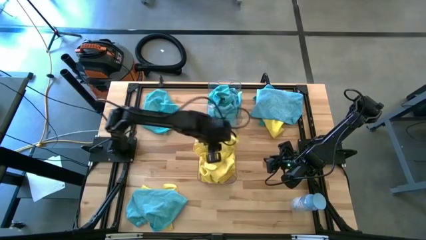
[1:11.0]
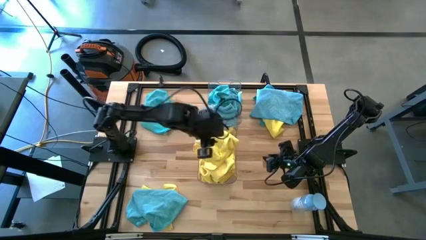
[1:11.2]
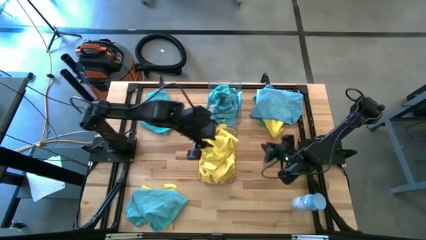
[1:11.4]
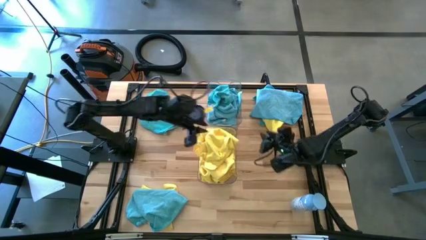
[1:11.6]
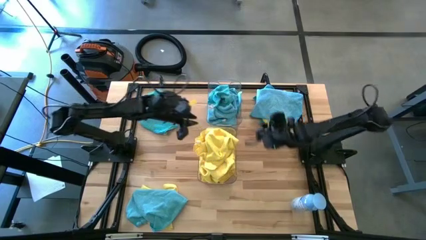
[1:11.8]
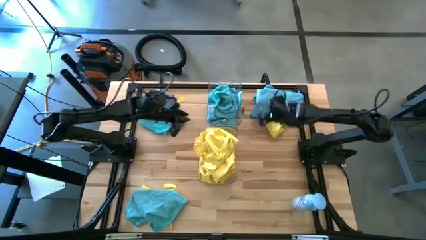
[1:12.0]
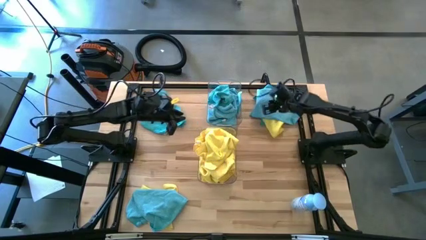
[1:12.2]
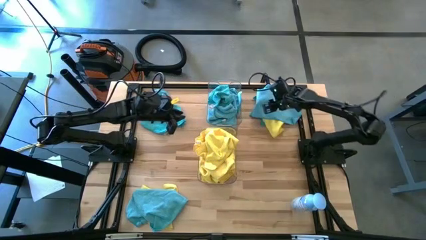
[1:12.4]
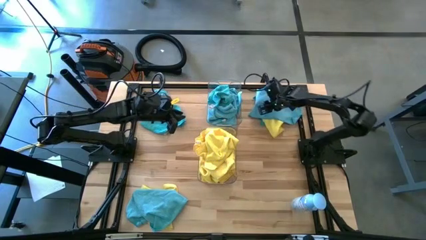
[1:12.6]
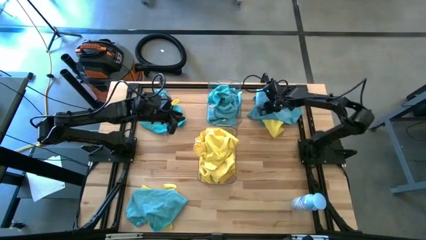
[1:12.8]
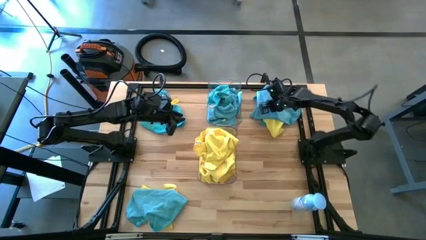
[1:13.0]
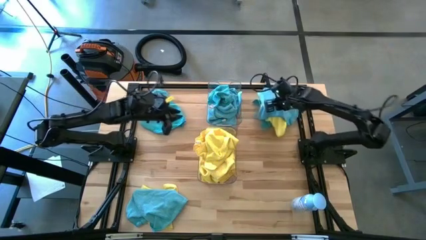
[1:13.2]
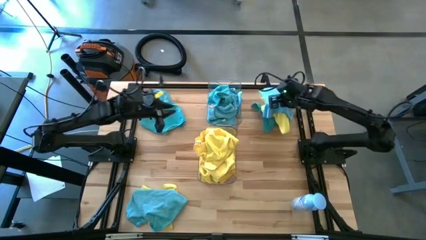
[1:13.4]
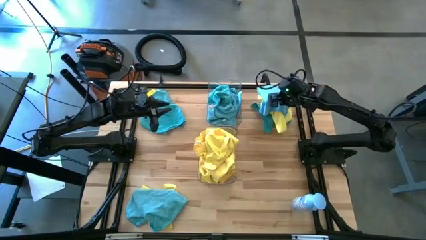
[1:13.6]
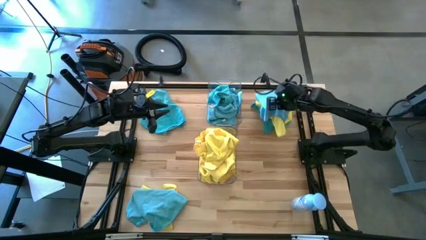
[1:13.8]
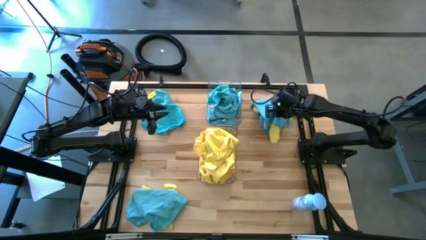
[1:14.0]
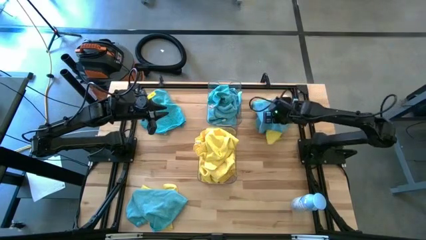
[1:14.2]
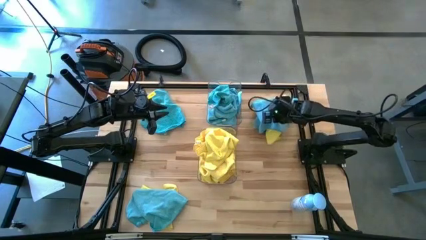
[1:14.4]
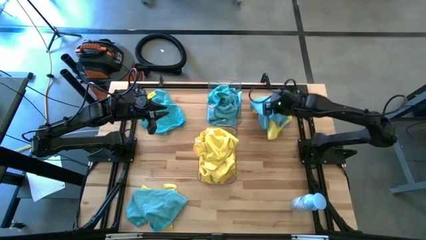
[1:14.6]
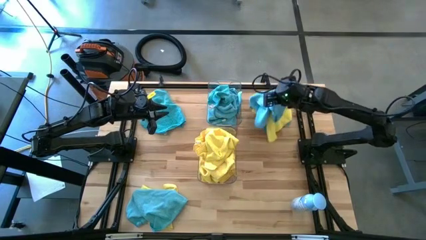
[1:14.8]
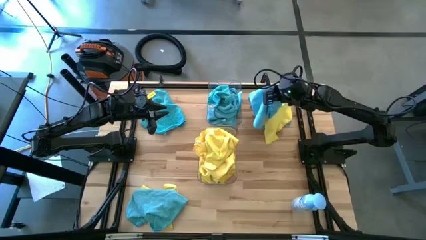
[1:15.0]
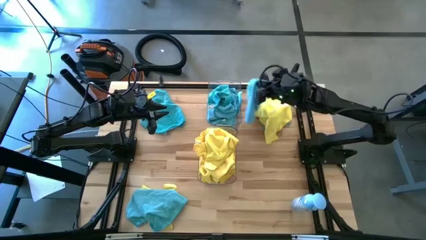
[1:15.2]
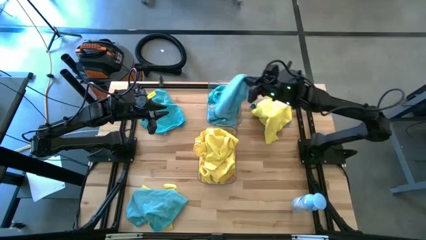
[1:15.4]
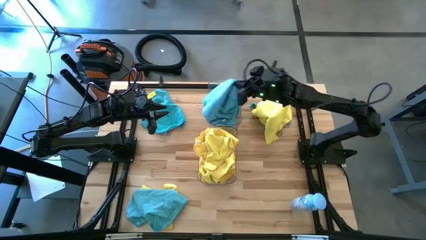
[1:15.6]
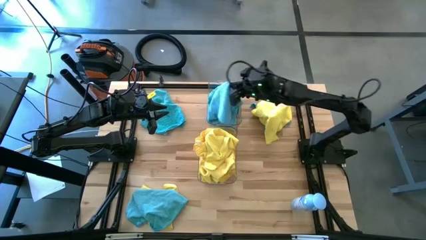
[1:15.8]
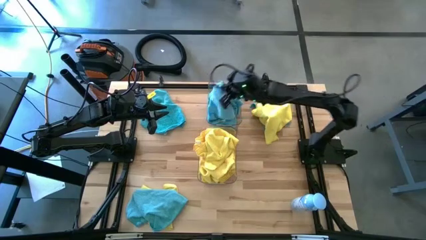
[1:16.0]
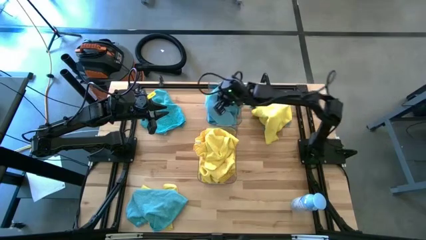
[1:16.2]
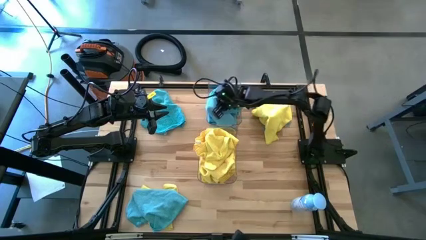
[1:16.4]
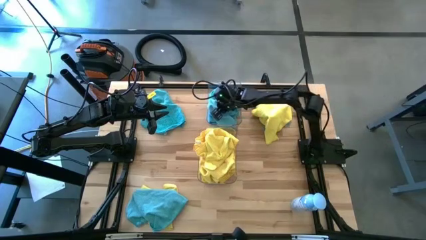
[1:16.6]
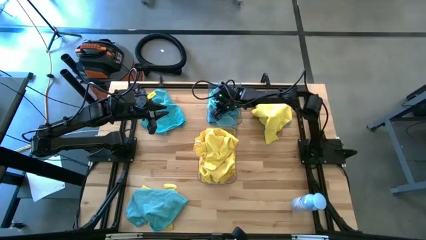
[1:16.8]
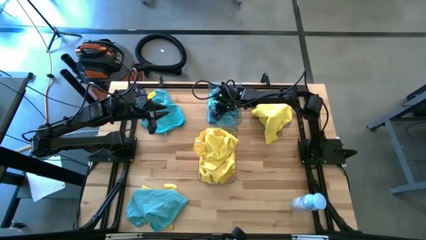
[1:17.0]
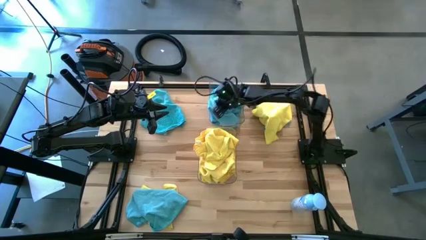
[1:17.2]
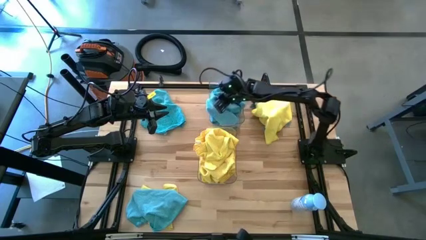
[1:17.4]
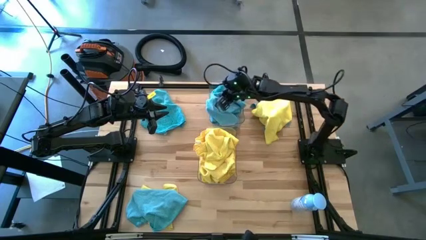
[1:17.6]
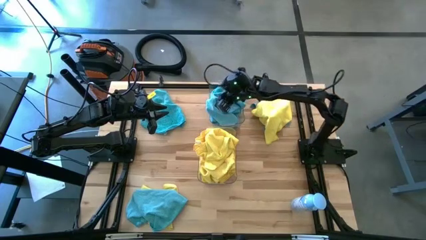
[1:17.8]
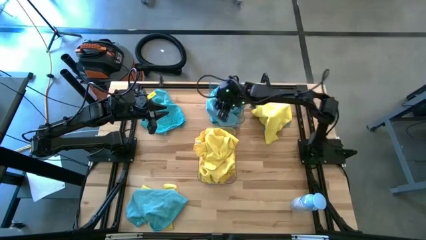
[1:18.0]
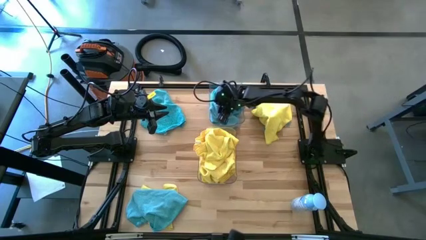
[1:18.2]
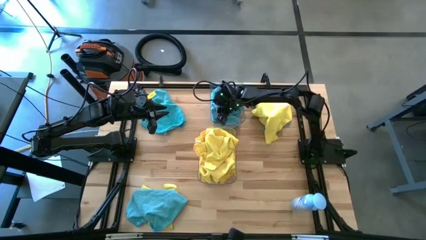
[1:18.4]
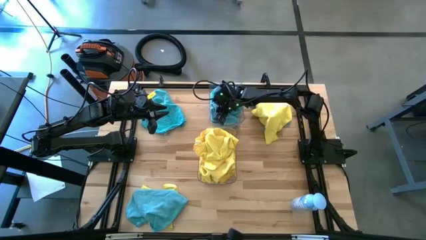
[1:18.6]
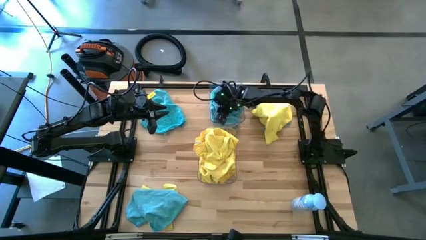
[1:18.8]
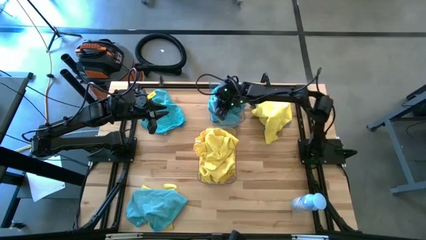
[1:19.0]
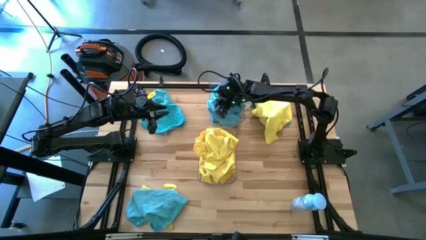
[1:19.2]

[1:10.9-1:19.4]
Task: Sort microfiber towel by color & place in baskets
Put the blue towel into the top transparent bin

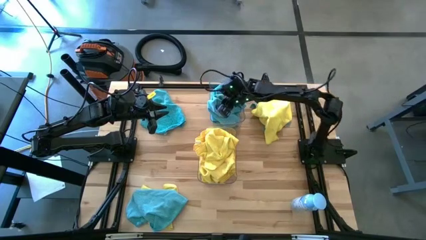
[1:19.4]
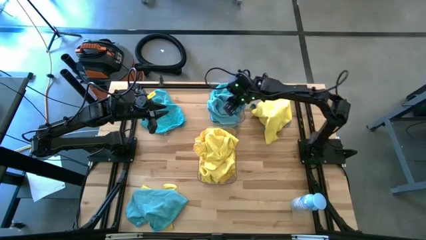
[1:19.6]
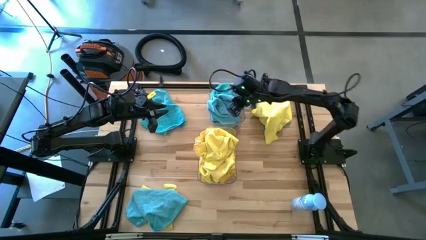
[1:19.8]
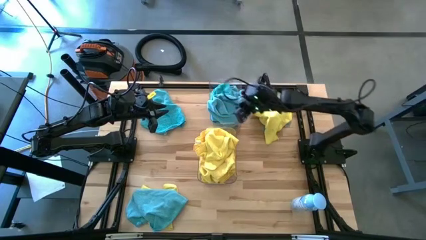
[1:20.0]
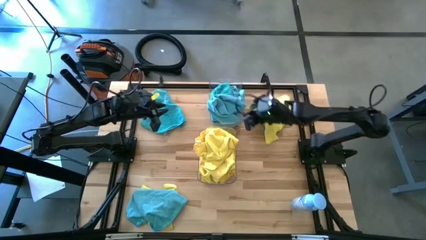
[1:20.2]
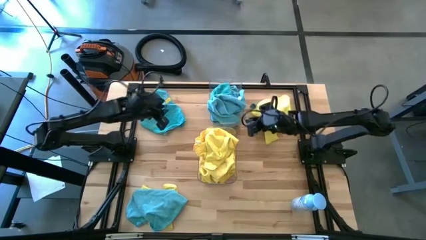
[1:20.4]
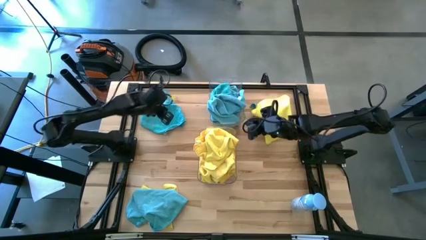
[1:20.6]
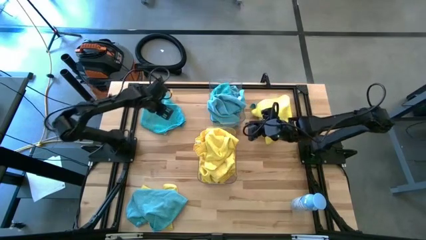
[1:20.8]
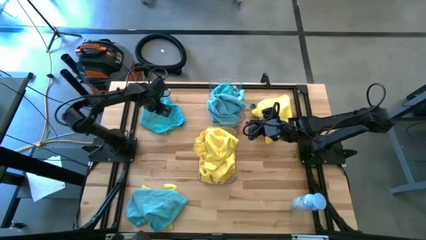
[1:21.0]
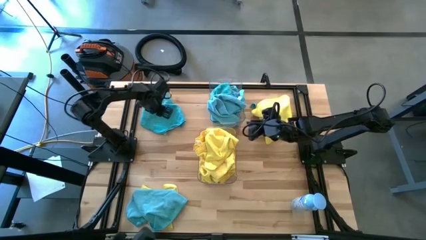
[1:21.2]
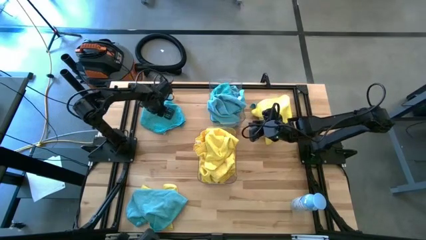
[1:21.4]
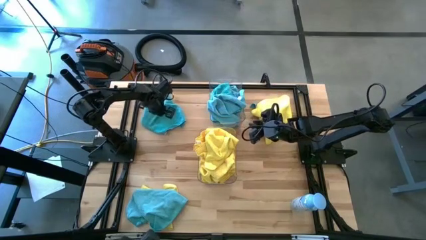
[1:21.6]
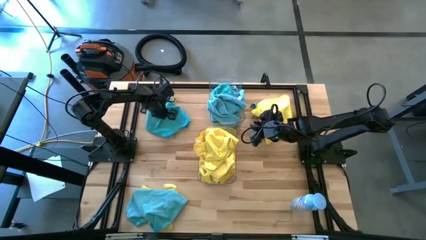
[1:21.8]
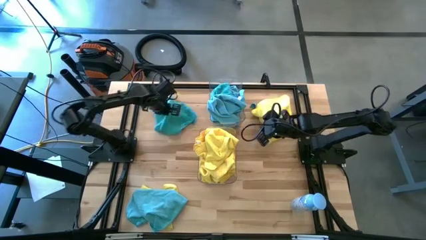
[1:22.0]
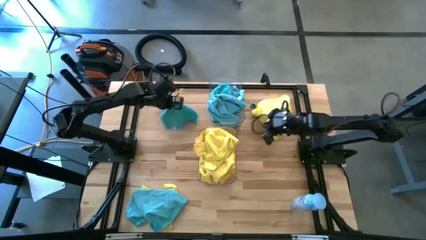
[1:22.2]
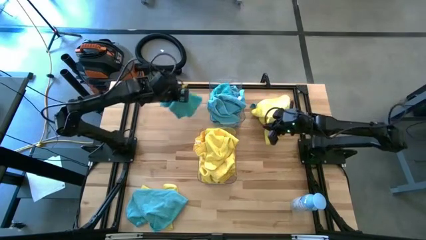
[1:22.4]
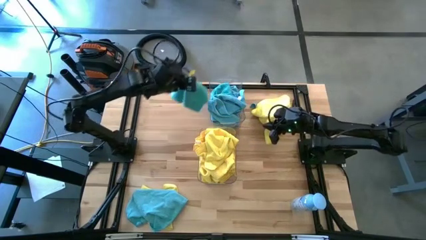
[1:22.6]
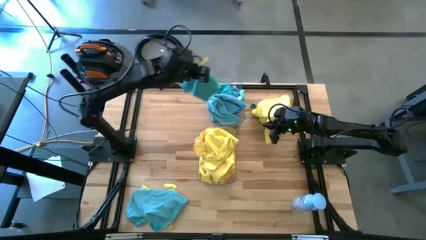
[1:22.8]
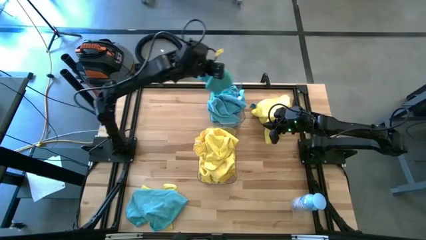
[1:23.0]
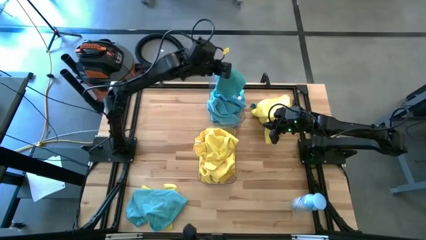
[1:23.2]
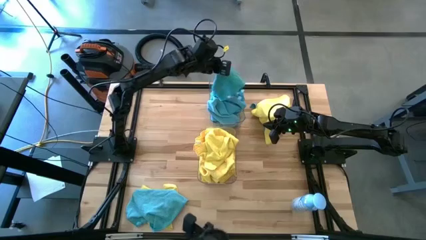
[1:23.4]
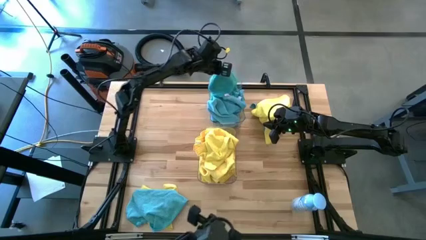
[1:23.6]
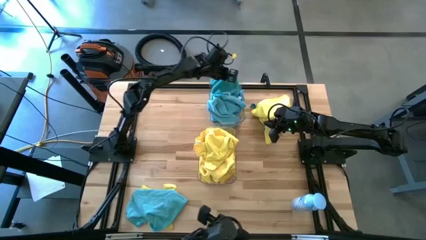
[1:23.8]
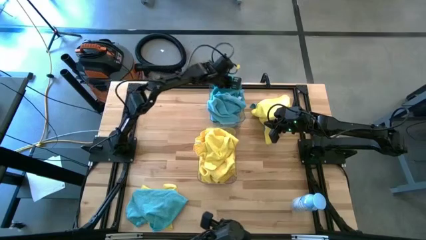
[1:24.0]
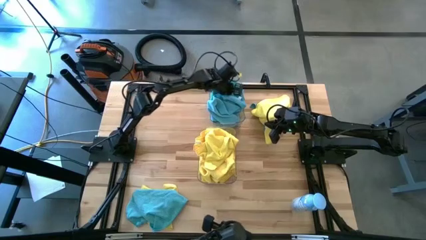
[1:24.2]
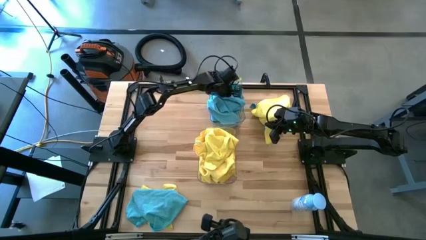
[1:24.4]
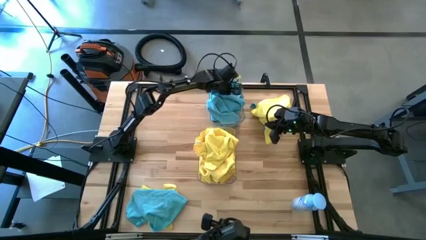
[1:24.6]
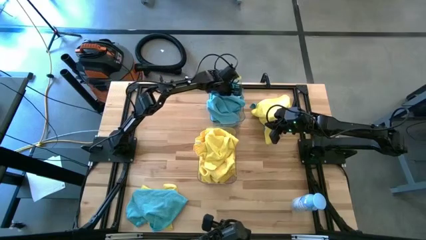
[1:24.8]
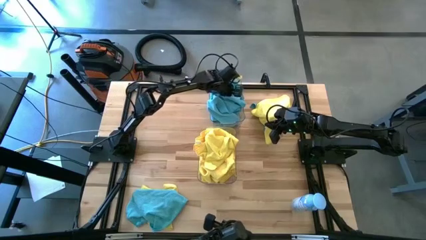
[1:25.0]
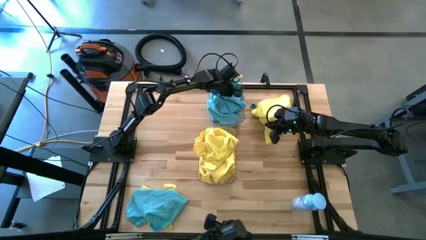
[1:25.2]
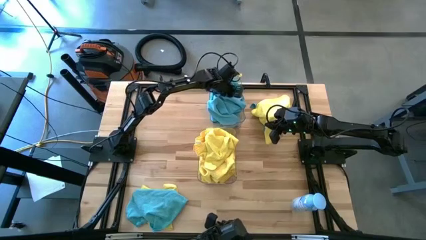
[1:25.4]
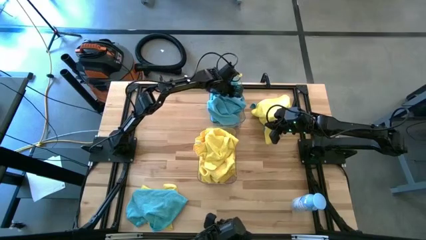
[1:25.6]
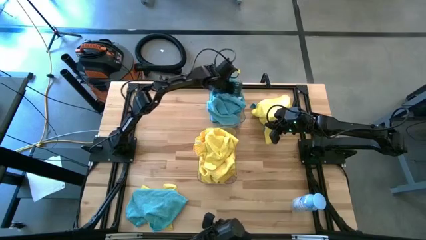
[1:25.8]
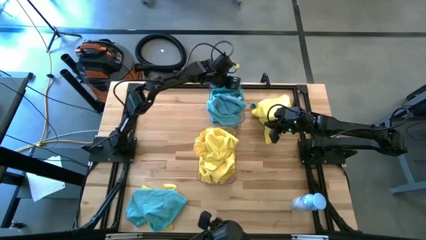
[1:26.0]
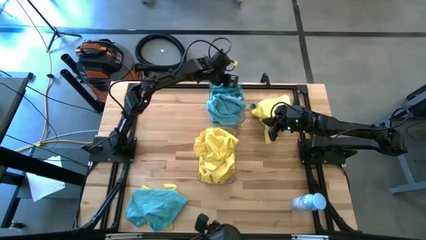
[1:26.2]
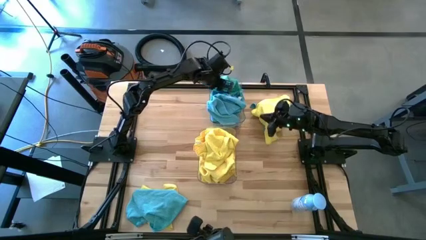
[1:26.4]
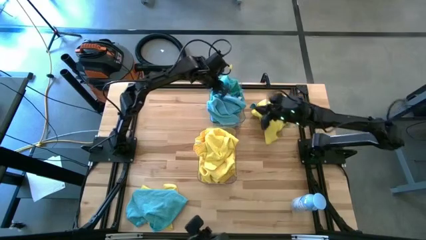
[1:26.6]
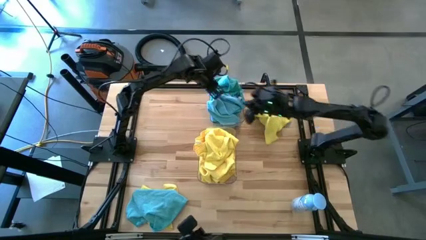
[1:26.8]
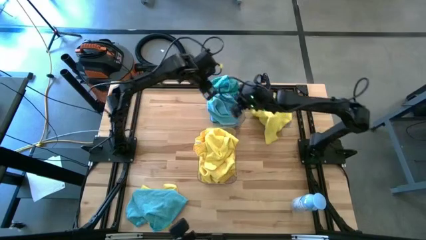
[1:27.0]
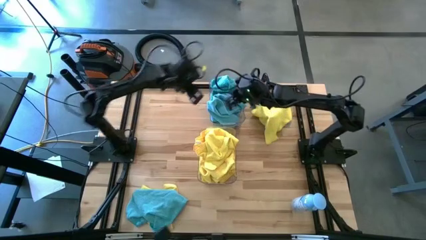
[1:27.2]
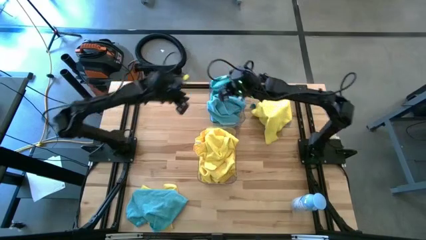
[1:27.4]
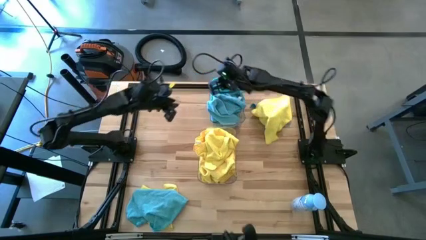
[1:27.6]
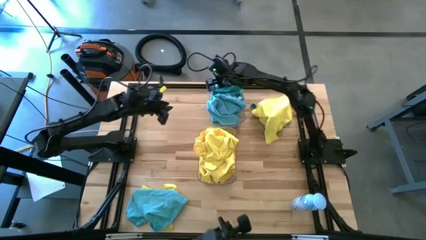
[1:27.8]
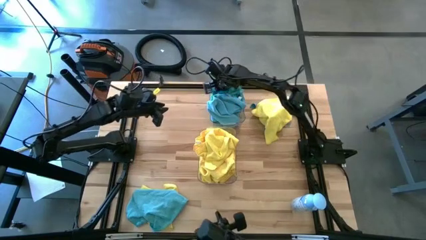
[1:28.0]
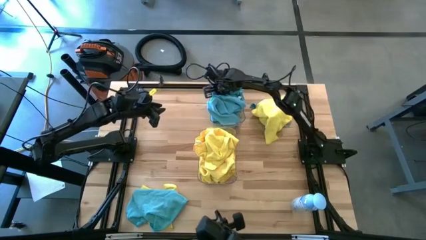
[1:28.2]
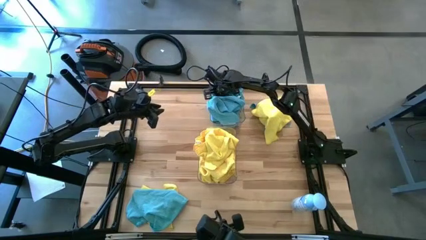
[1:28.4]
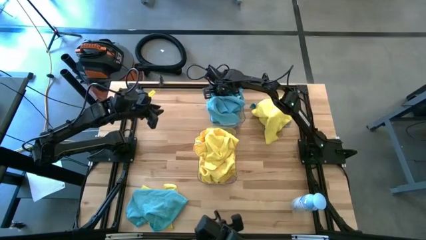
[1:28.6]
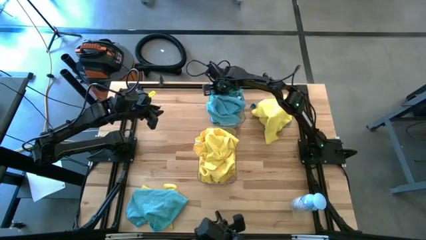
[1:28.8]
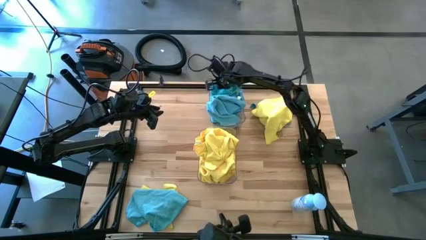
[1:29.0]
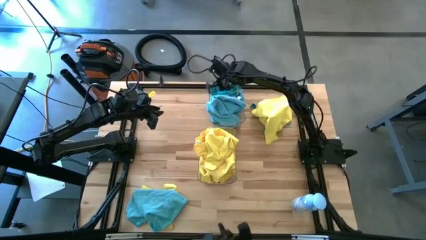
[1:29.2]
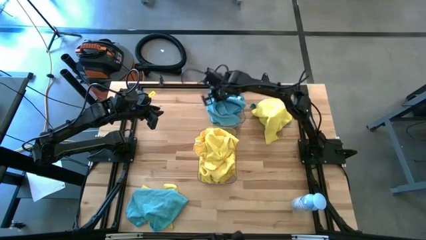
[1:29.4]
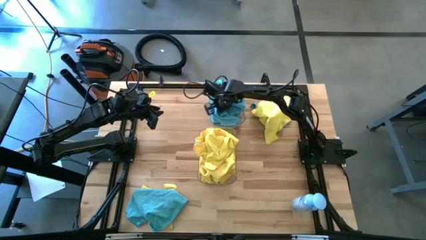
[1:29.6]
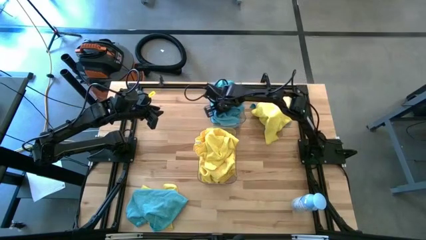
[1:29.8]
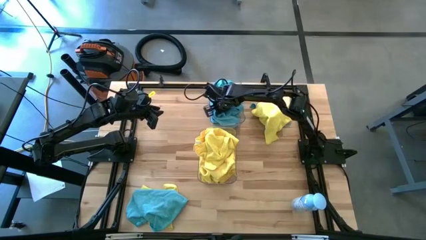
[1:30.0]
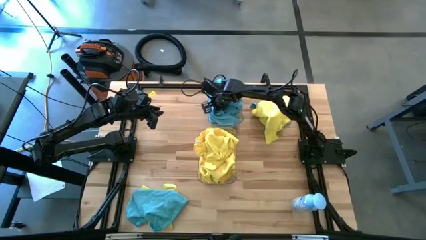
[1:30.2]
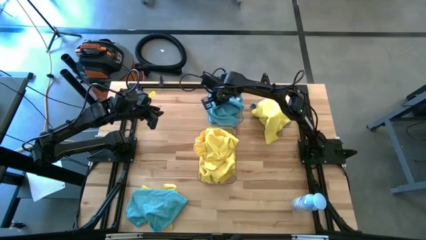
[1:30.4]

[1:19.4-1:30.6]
Put the blue towel into the top transparent bin
